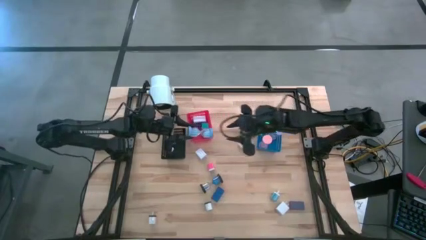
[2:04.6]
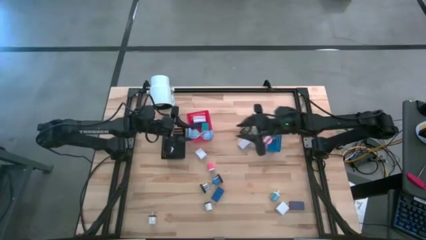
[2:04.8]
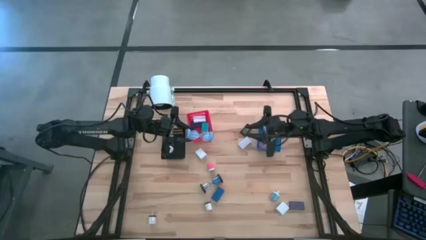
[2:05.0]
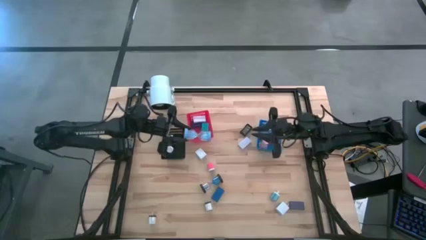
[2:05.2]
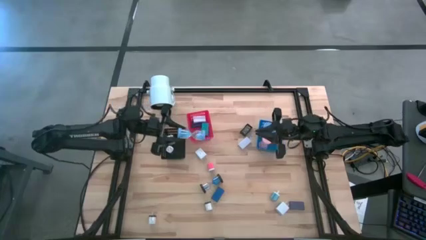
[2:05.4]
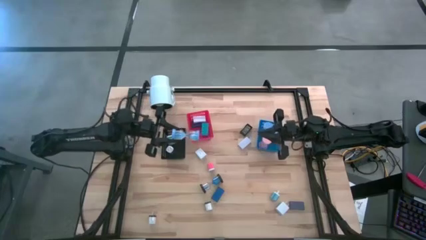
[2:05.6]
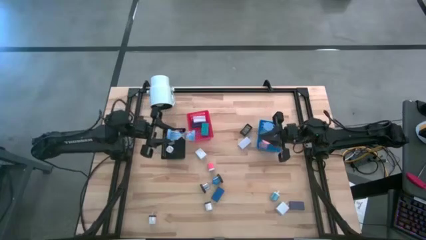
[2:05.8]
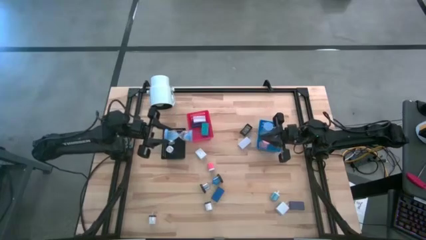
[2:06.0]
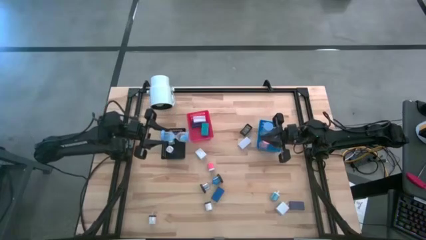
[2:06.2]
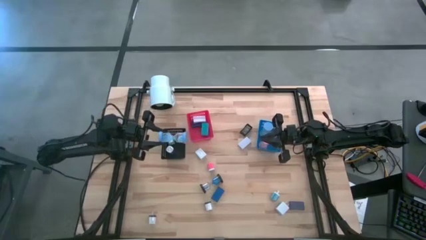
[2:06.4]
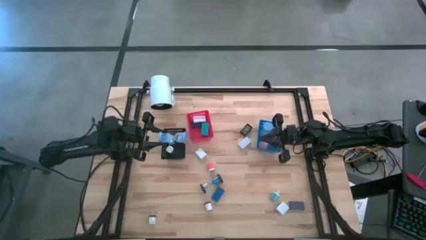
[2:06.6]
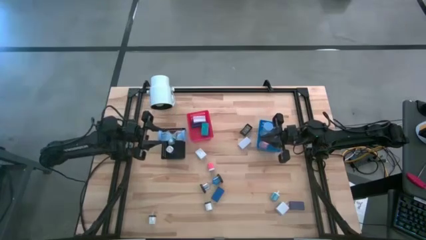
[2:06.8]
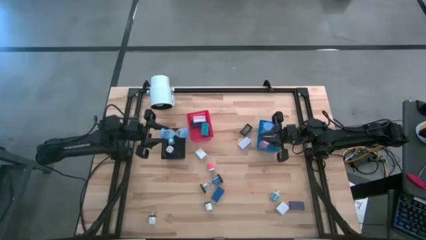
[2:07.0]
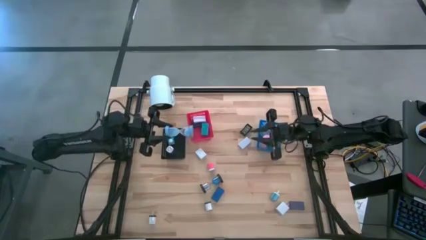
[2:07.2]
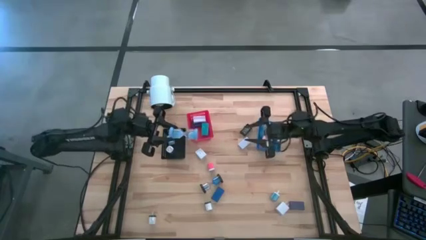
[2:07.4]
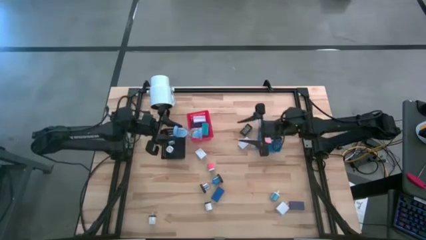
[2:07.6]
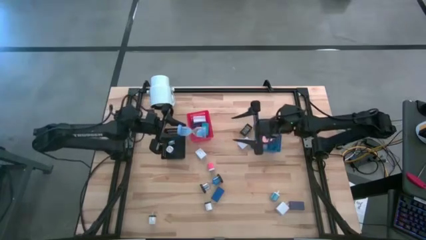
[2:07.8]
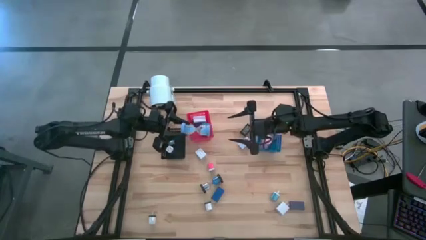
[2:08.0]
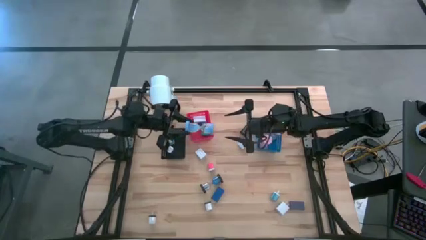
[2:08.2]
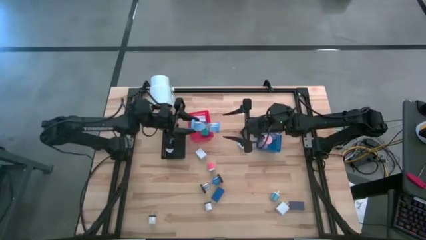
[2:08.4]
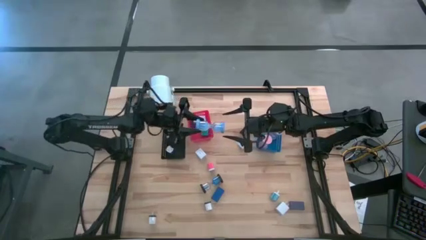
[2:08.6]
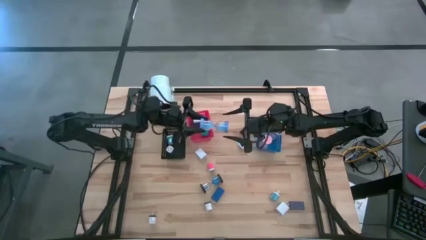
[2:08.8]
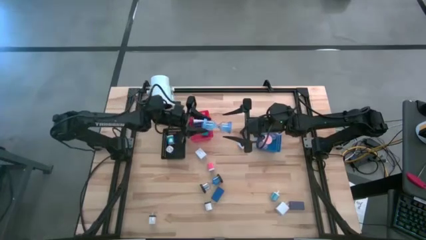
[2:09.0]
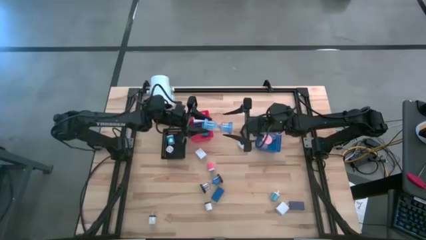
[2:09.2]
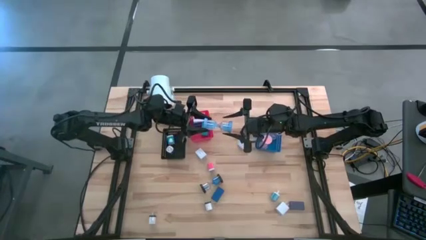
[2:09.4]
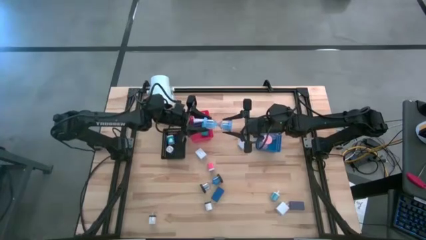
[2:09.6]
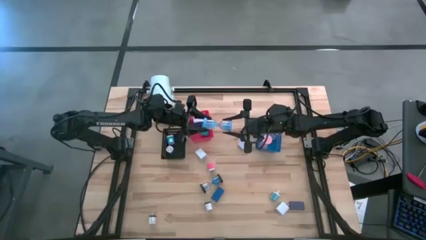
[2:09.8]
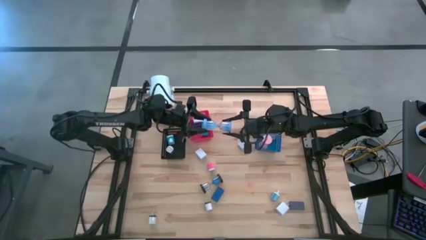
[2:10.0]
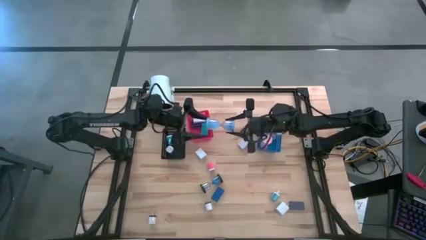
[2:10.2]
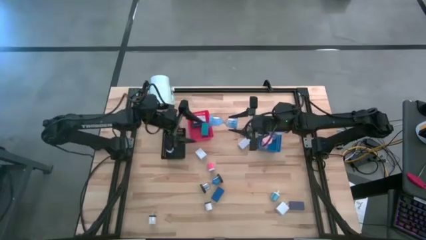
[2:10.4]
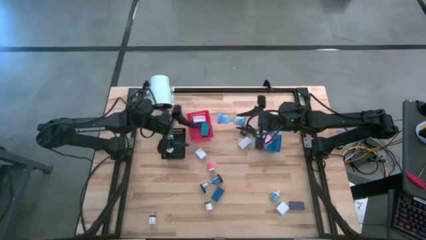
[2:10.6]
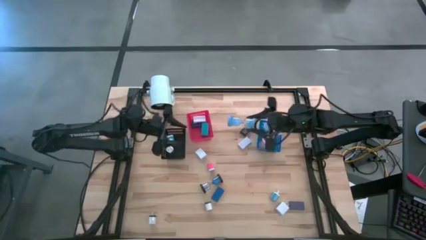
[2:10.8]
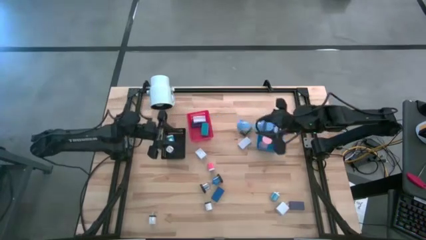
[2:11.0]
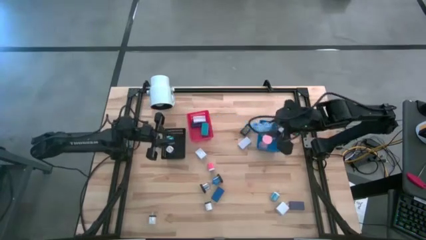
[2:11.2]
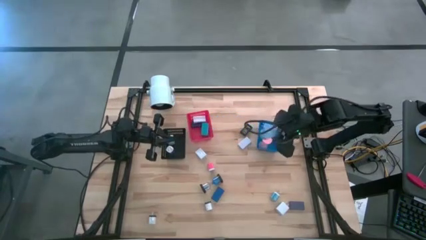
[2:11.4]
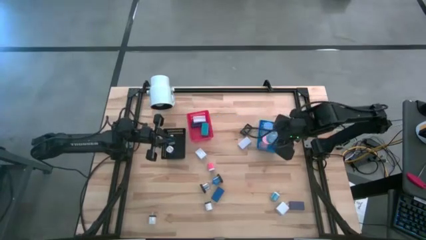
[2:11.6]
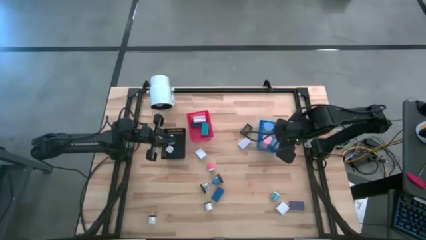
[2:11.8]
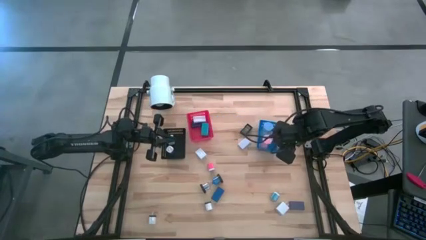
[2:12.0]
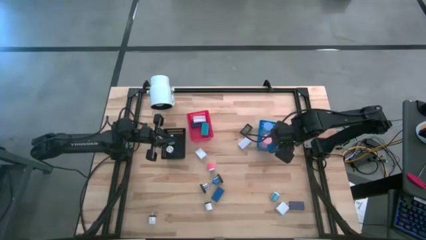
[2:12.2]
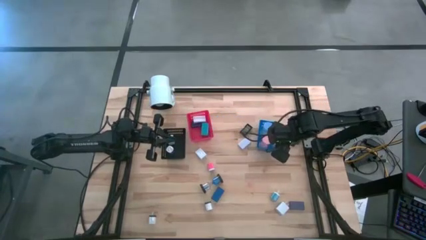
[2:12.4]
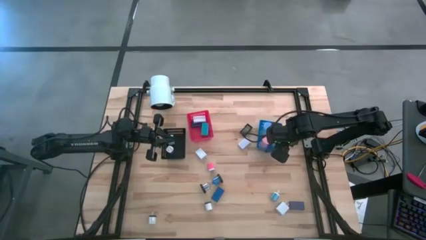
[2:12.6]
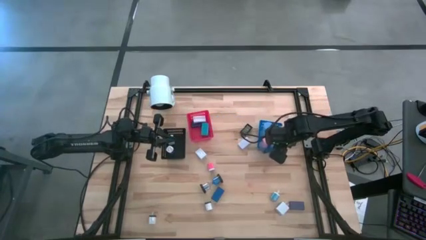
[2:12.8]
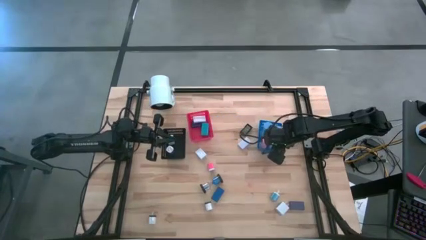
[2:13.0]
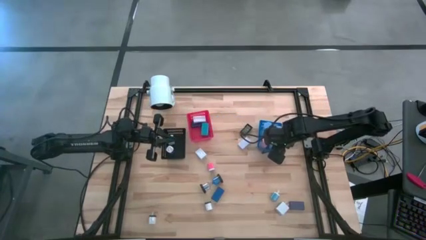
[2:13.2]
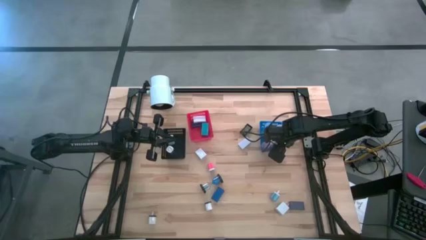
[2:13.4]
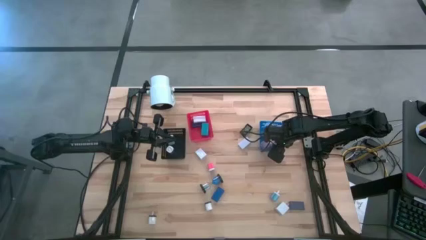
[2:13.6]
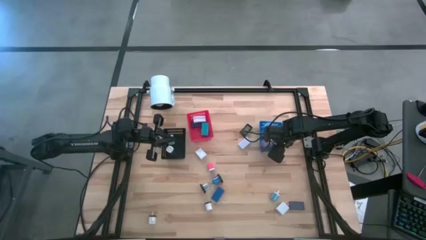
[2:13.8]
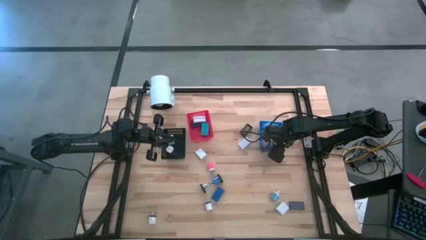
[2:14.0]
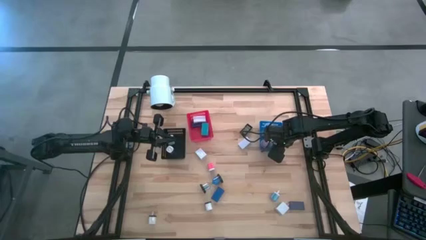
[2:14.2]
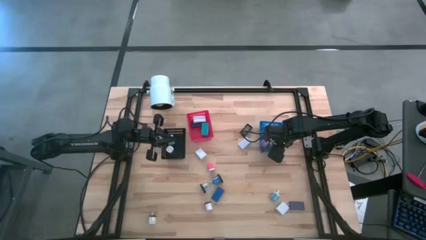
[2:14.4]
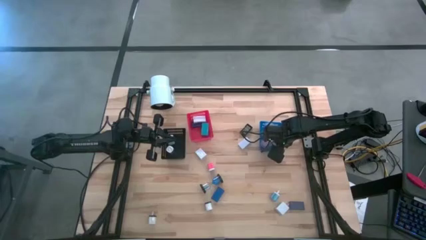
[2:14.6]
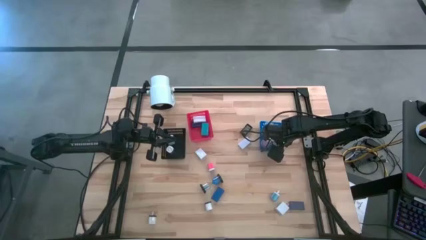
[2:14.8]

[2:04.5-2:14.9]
Task: Pick & Place Office items
Put the blue hourglass into the blue bin

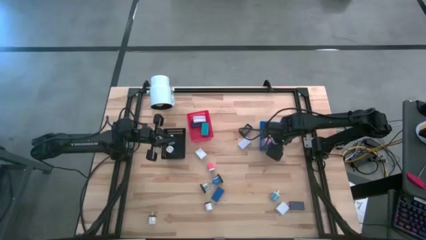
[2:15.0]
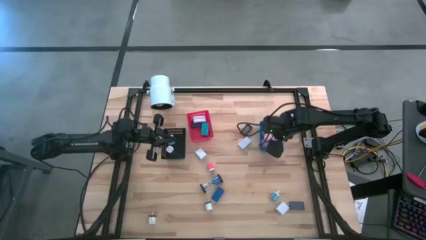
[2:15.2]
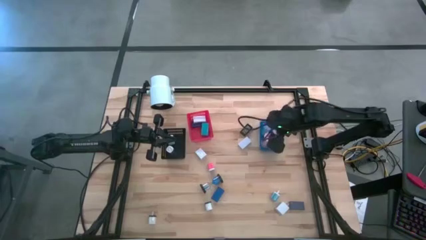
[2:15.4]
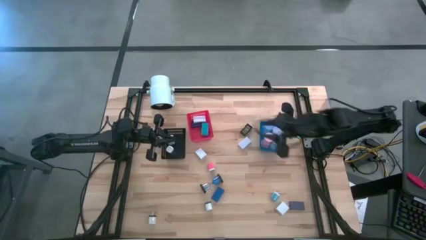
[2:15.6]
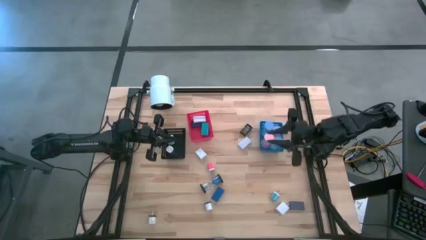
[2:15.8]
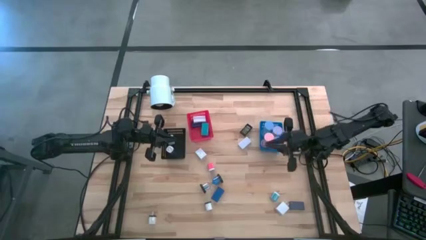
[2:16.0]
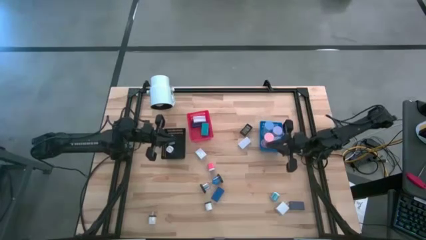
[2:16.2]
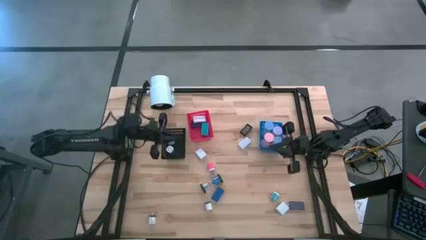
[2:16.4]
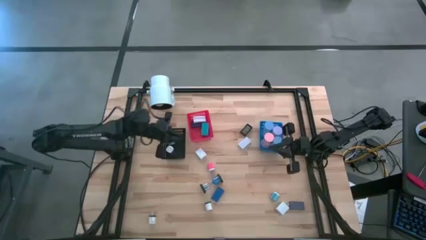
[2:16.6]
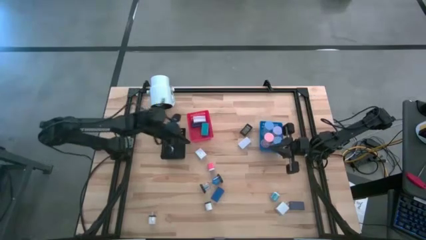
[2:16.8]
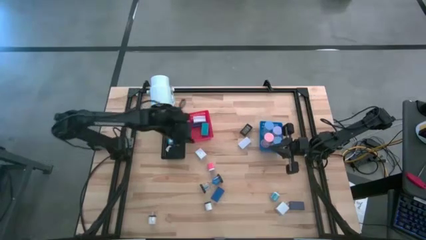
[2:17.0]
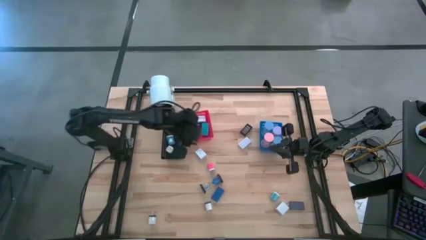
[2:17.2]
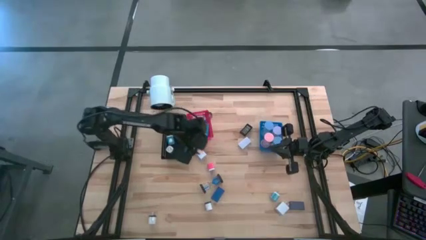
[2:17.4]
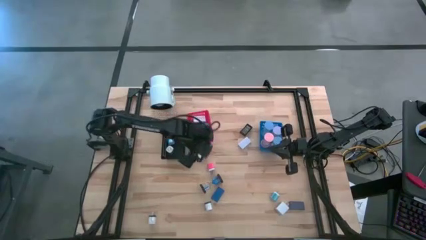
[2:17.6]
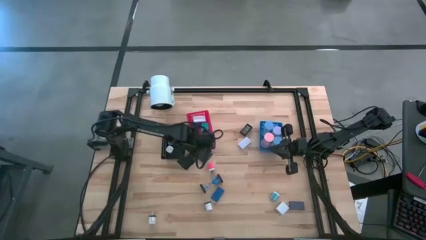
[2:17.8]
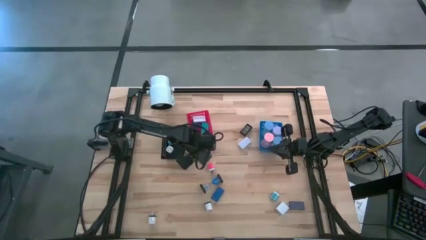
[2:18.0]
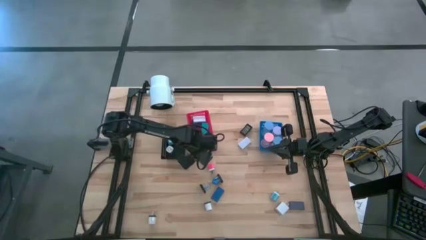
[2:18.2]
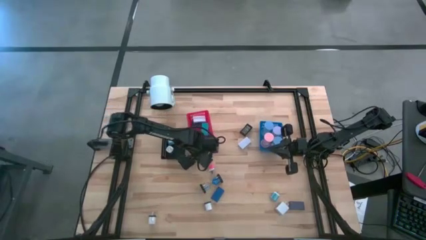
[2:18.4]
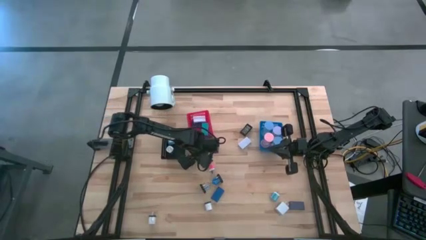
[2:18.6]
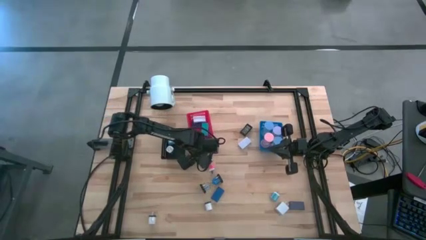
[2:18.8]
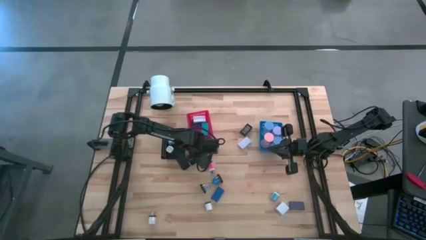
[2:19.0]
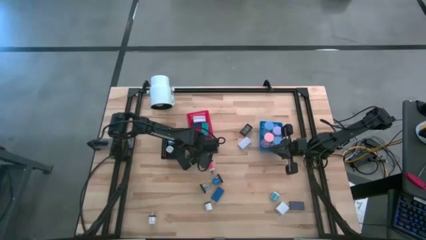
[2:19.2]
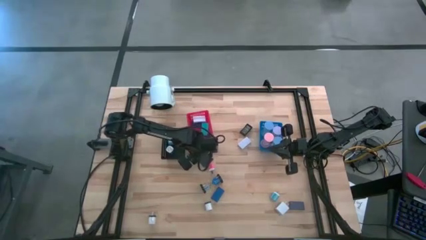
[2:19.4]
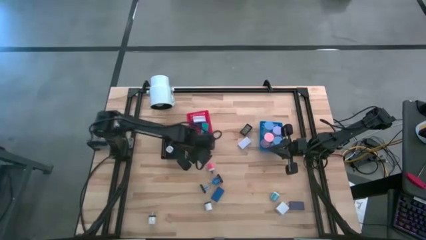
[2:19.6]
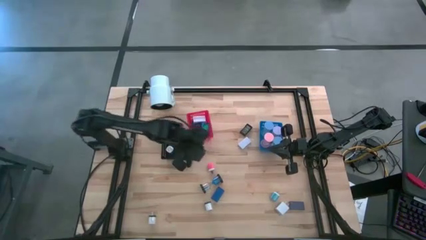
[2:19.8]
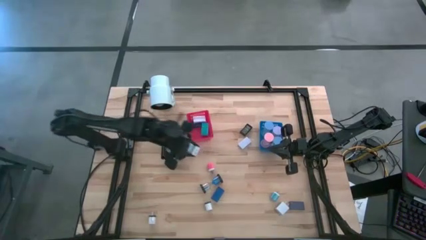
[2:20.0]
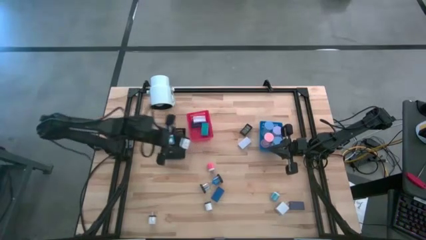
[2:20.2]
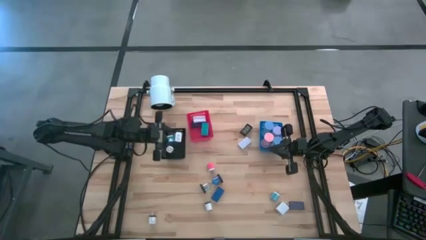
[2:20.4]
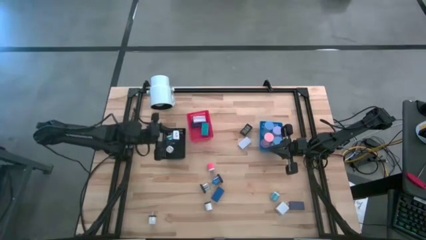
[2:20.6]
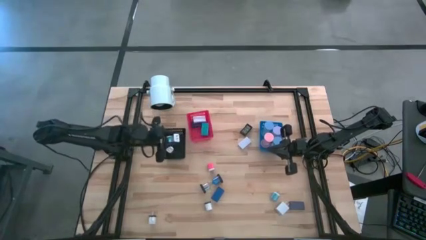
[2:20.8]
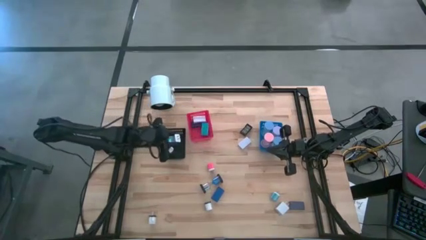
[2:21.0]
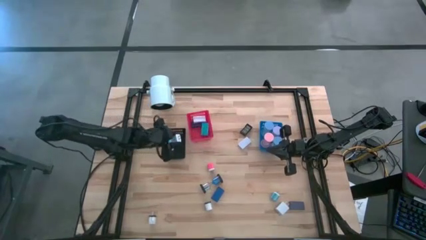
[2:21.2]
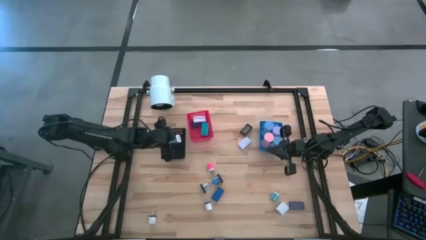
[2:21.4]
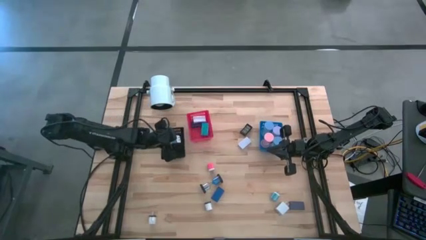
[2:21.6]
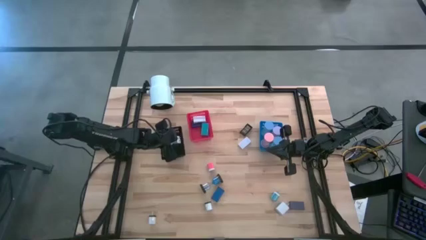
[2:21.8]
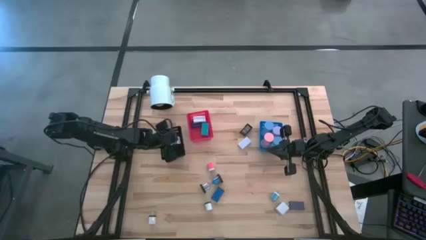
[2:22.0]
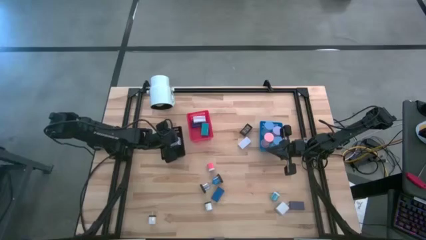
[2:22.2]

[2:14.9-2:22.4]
Put the top white charger adapter into the black bin
